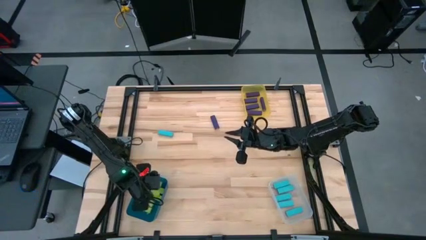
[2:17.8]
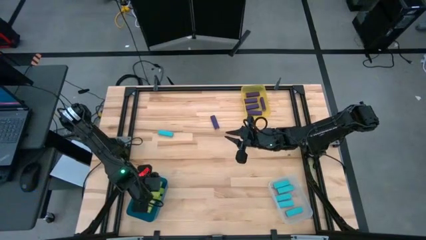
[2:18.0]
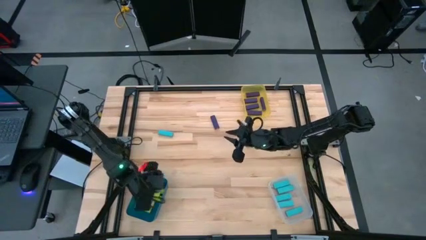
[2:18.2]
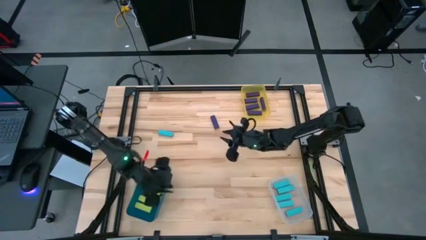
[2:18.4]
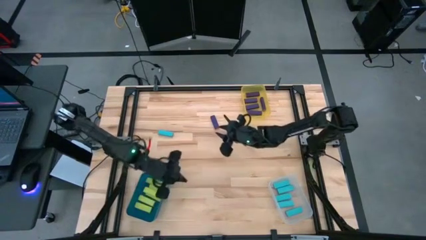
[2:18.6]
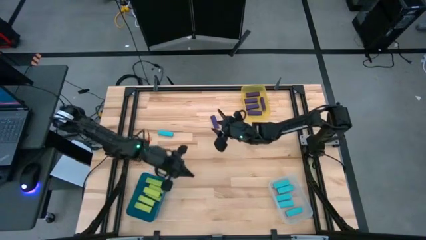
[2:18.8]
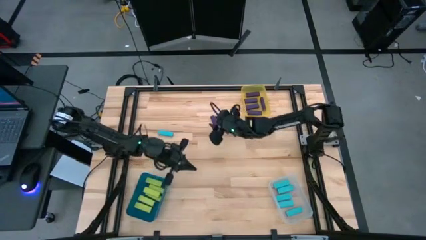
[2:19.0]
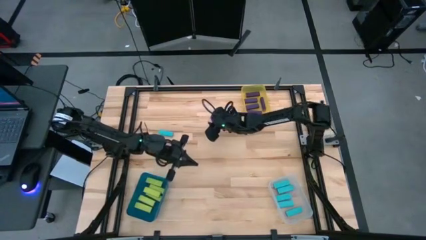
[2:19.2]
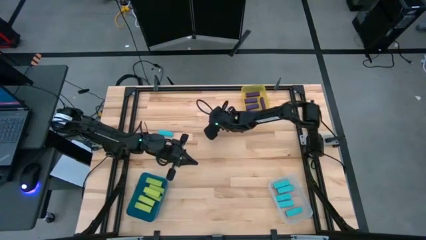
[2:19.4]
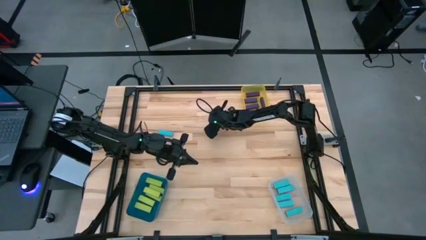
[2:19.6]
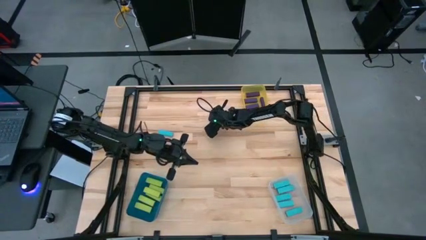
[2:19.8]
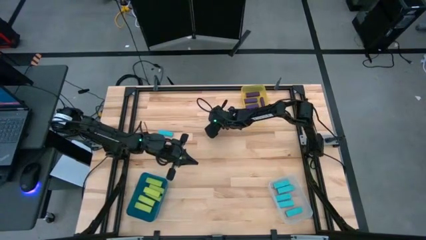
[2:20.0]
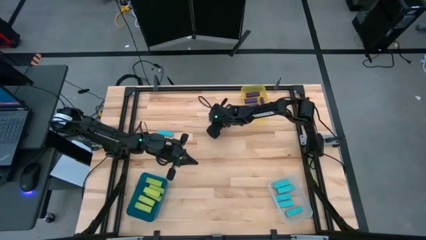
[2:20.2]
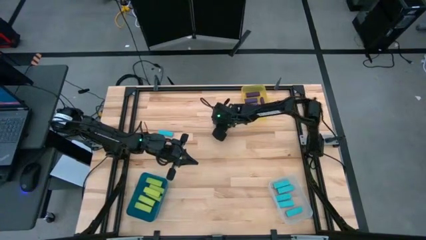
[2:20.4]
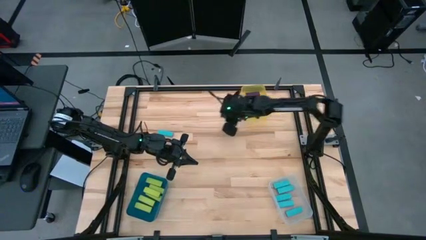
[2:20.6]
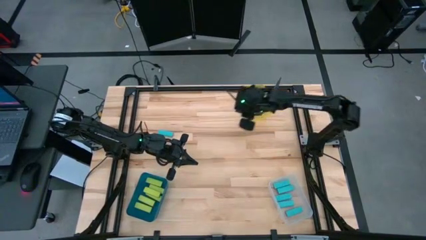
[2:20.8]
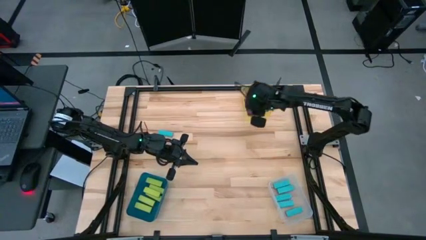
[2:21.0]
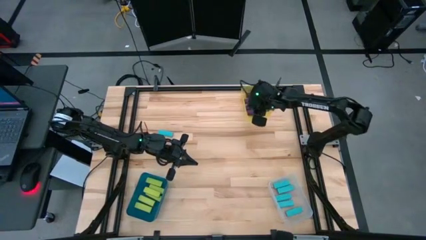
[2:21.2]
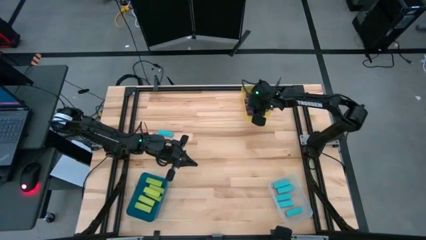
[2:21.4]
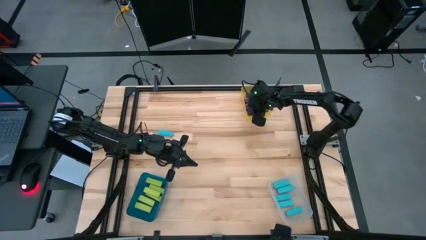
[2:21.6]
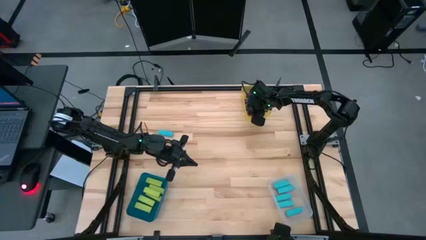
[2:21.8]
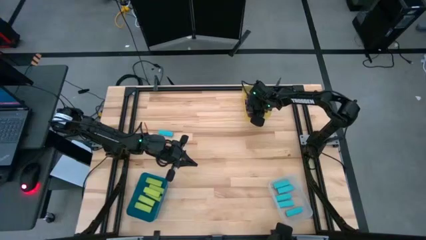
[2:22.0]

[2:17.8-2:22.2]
Task: Sort blocks
Put the violet block into the transparent yellow bin

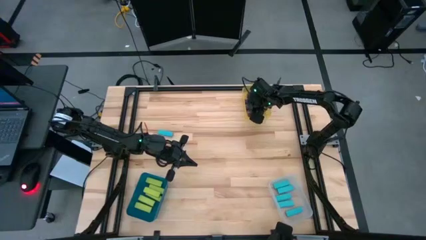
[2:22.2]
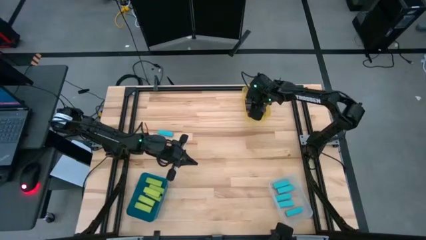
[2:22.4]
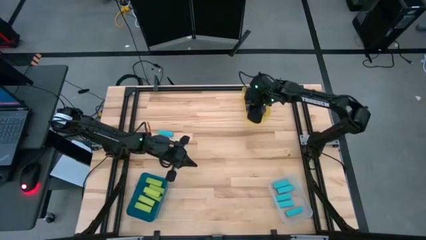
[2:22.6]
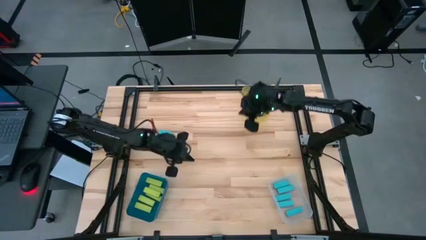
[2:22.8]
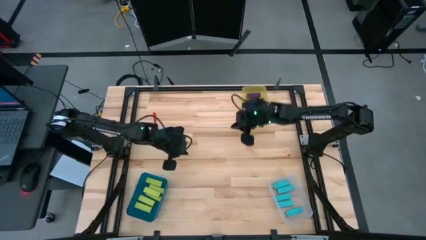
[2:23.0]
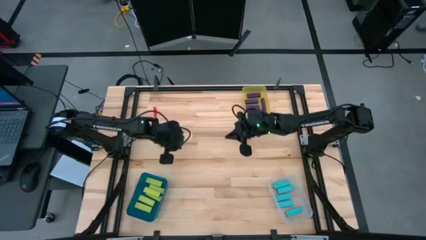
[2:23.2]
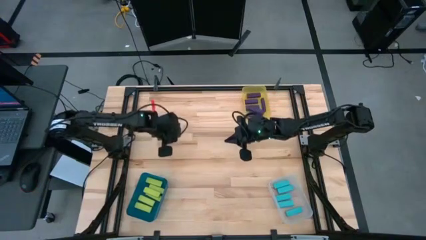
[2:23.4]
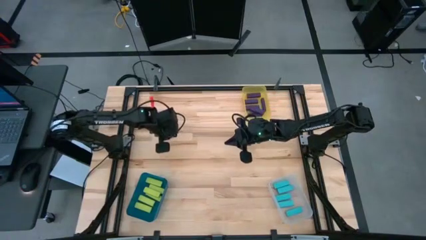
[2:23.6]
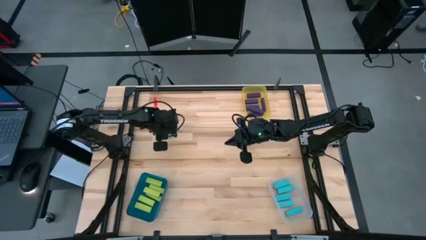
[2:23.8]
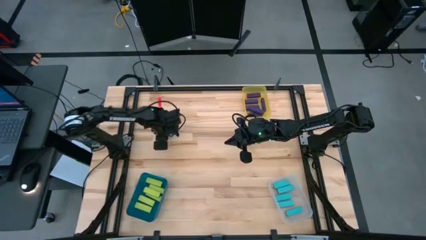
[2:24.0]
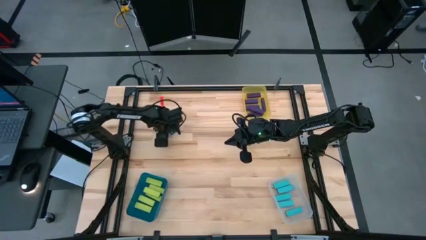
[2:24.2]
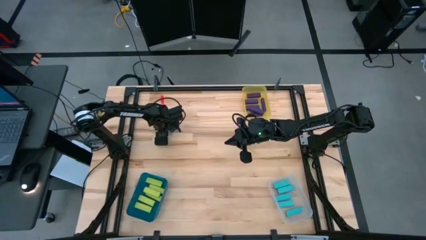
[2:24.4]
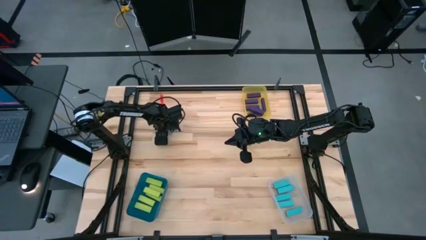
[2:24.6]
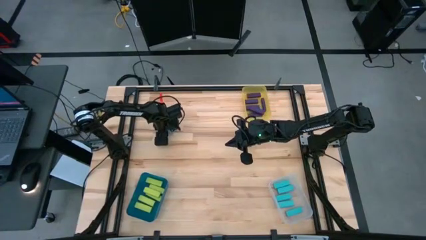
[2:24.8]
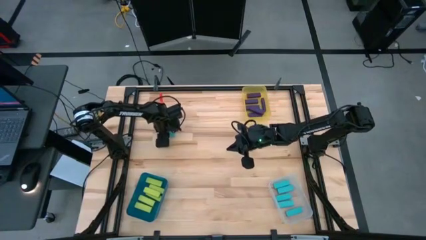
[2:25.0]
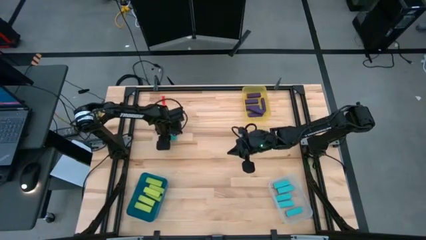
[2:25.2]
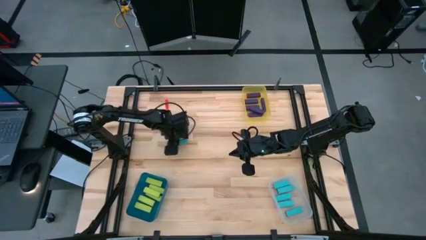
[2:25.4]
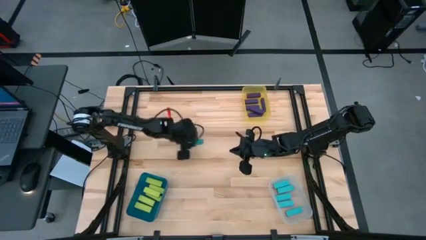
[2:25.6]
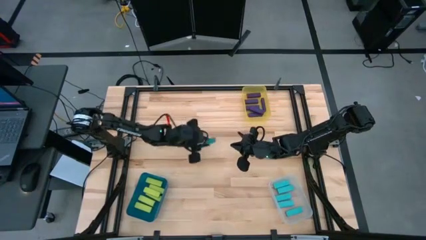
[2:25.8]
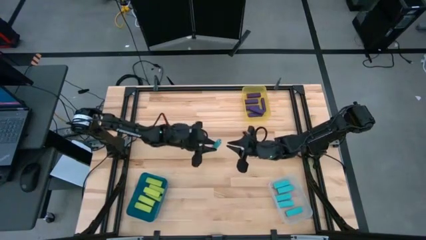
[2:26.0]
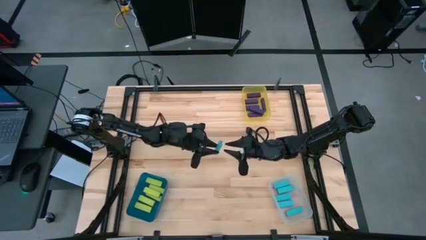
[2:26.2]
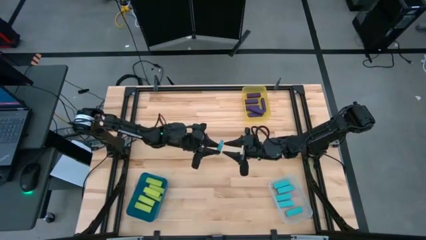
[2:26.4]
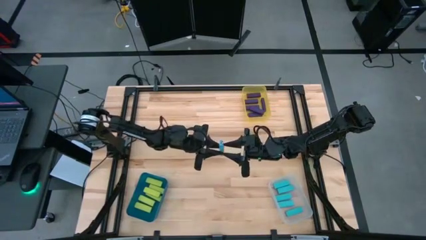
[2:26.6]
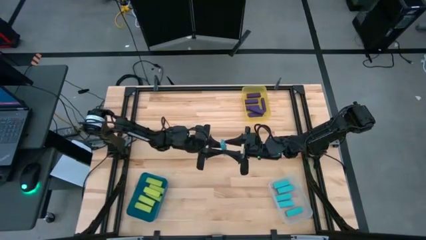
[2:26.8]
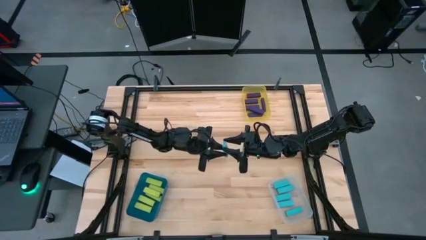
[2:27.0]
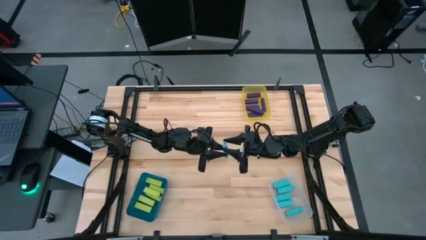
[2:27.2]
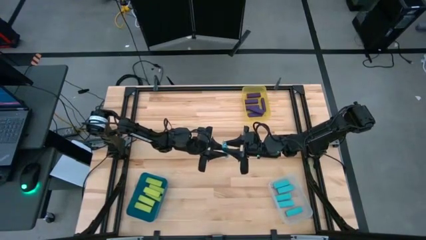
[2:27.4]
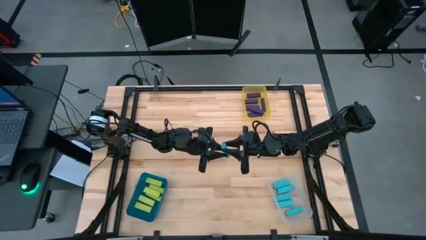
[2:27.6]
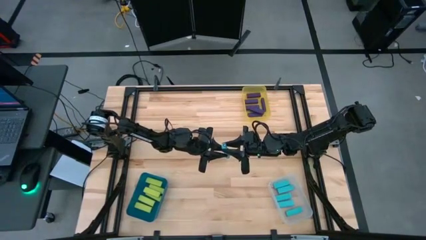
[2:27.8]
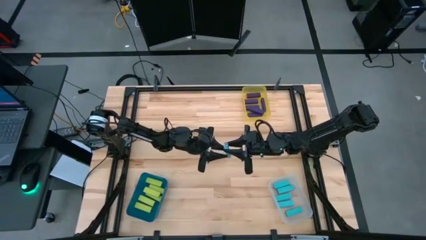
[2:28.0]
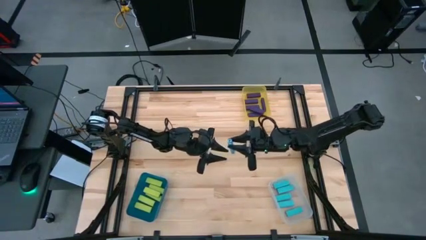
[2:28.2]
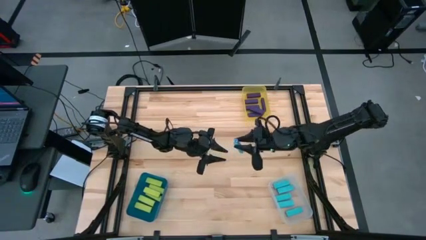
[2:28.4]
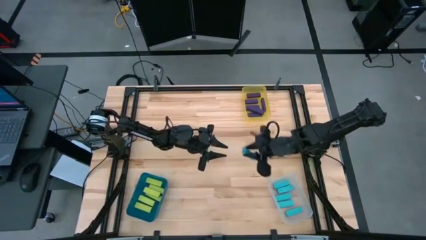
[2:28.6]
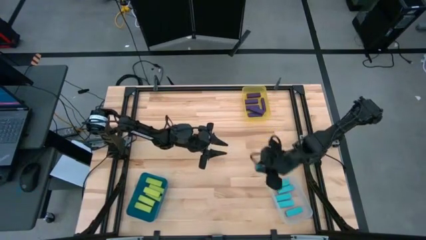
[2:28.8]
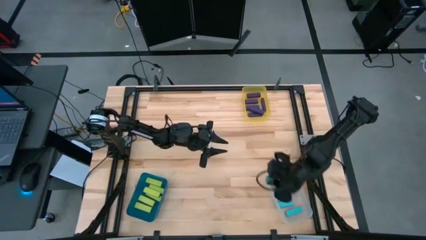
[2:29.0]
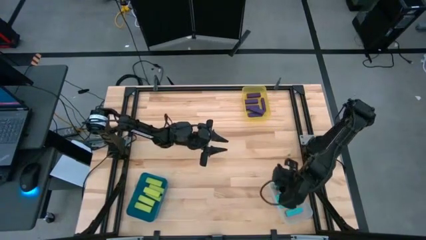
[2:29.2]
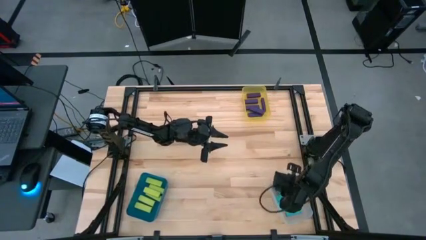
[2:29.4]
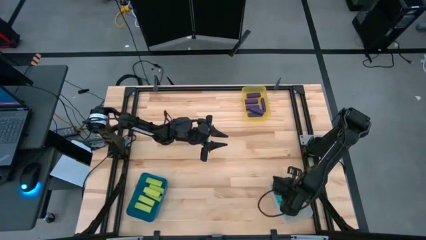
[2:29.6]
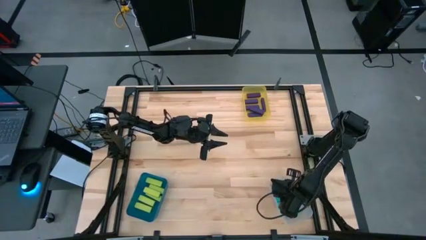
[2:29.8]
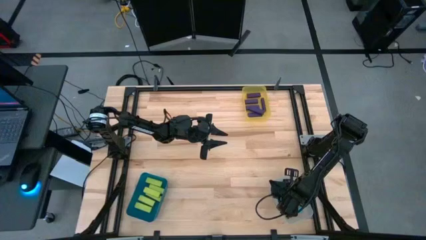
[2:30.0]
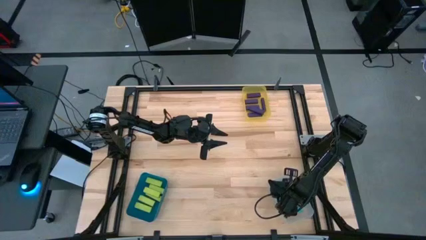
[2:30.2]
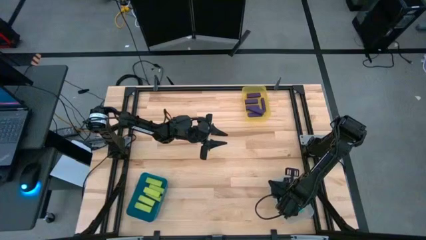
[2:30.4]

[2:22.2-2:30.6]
Put the light blue block into the transparent bin

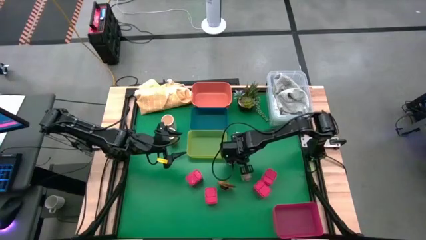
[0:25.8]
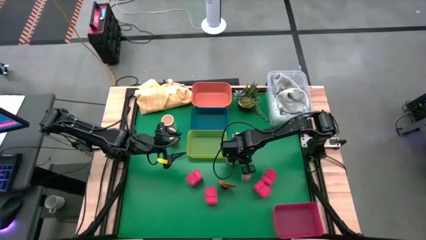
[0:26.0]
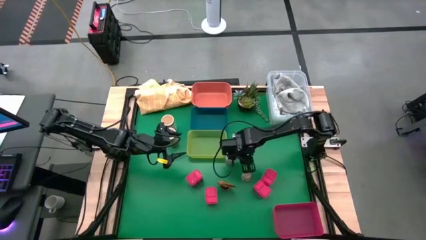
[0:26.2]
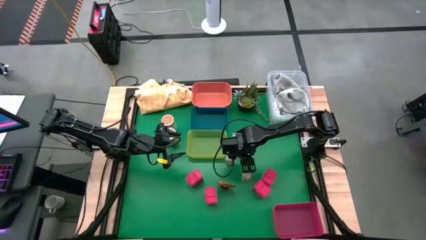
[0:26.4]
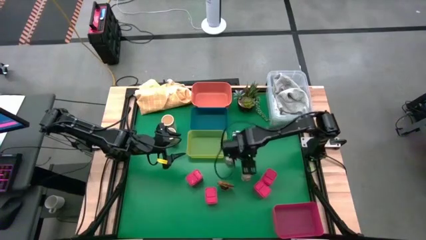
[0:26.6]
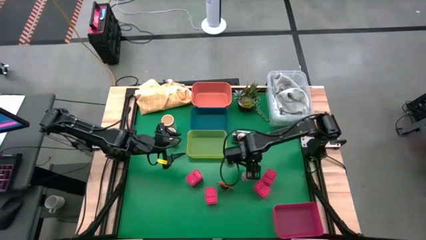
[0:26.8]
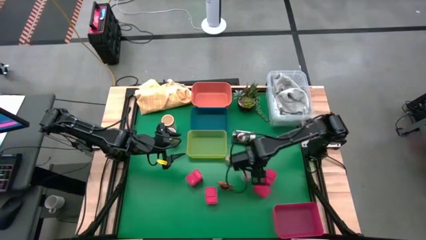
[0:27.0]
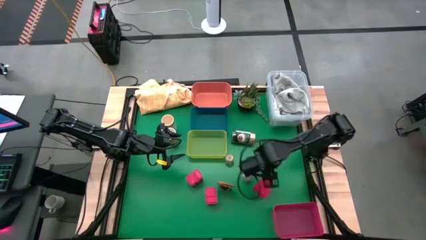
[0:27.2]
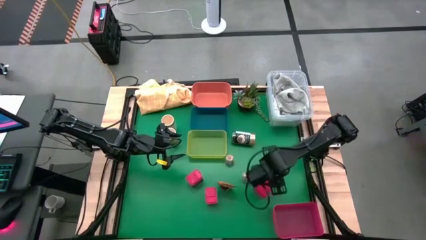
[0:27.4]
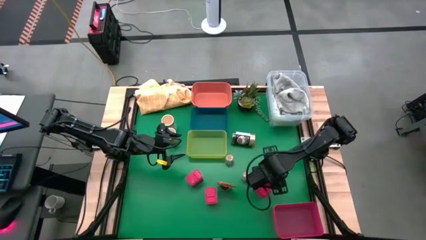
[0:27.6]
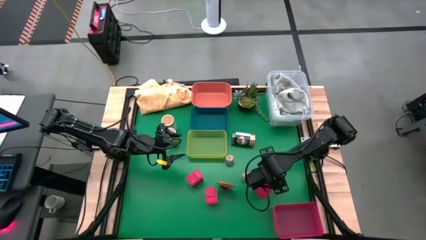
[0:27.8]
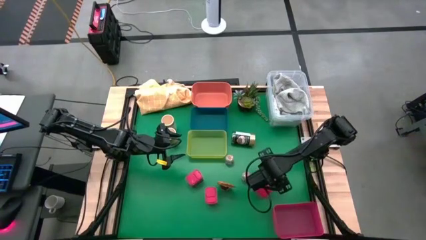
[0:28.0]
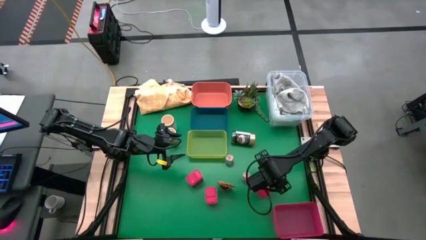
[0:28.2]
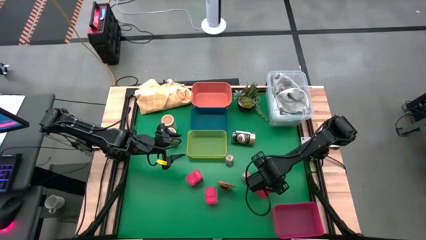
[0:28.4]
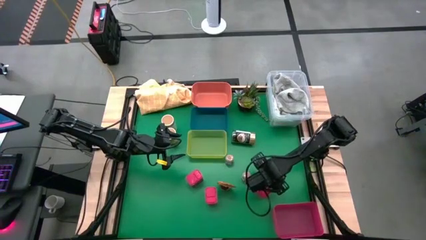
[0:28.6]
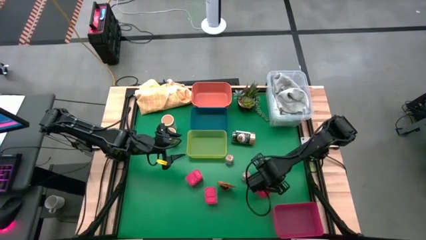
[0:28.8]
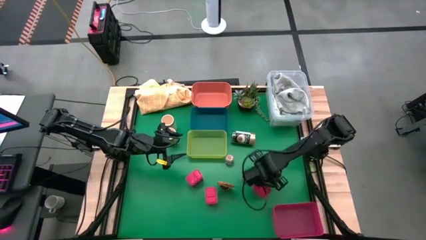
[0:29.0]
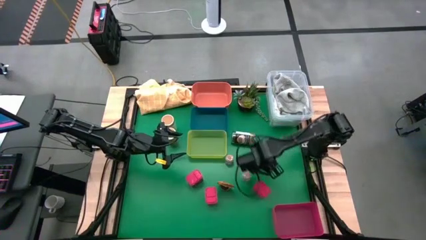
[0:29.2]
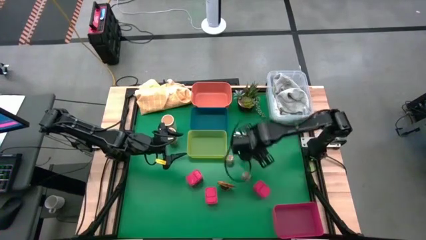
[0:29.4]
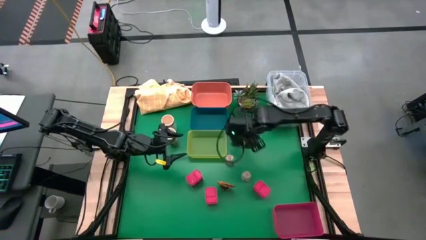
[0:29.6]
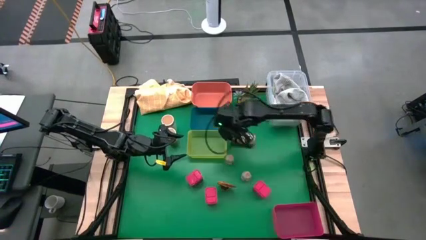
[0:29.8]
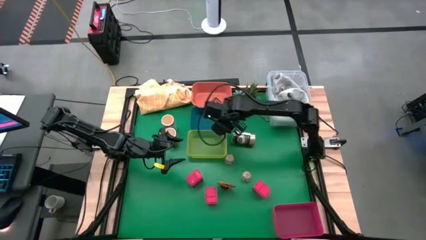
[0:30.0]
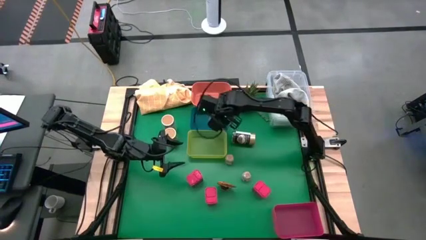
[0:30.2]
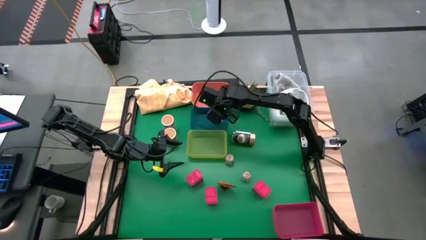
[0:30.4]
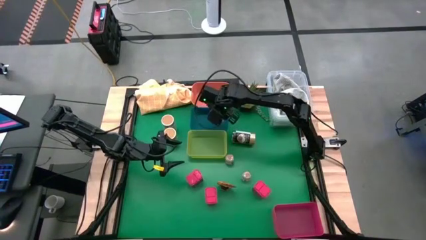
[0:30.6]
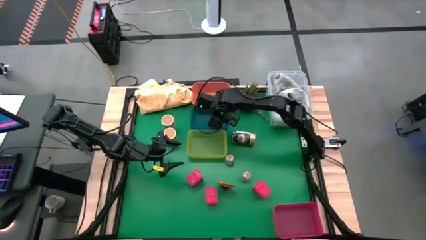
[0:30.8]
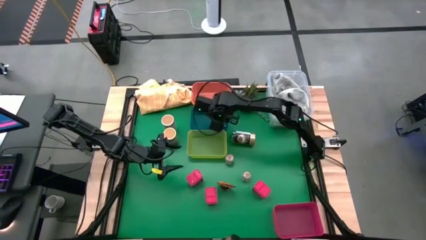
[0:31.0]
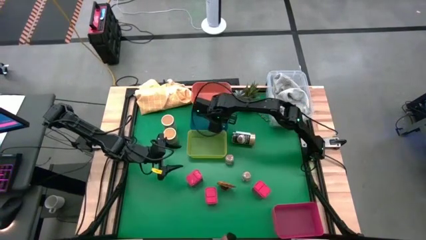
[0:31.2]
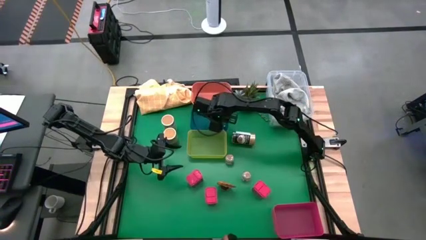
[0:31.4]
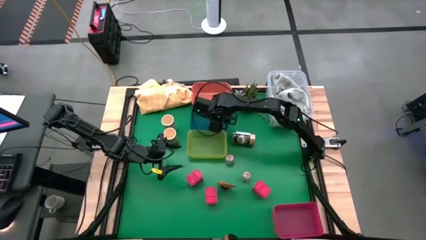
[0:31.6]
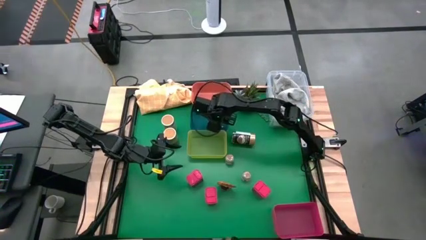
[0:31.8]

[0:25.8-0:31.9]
Task: Sort spices by type
Put the red seasoning can into the blue bin
